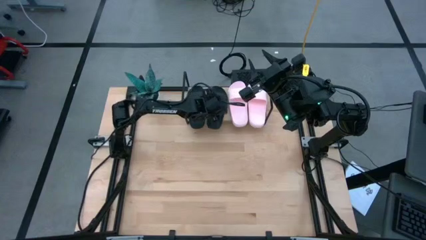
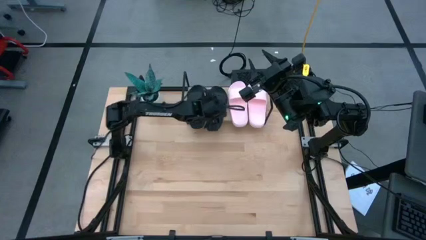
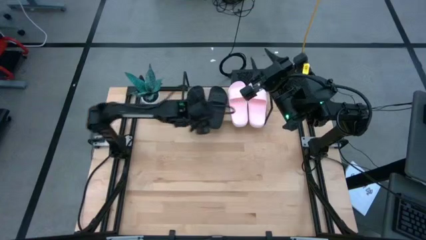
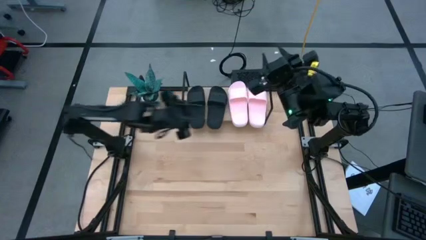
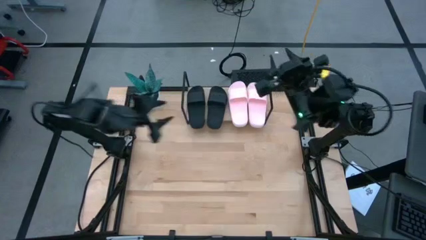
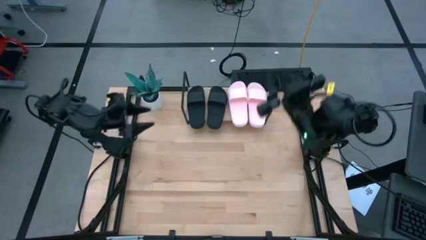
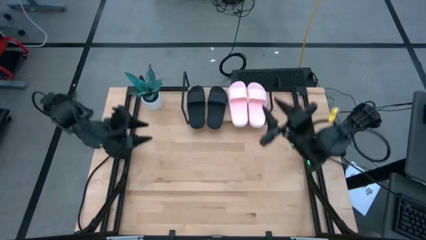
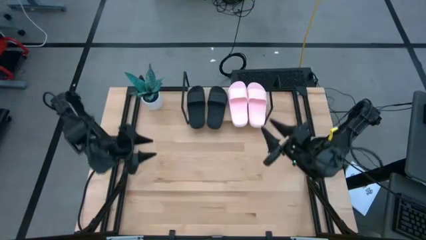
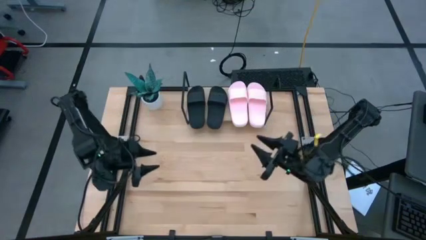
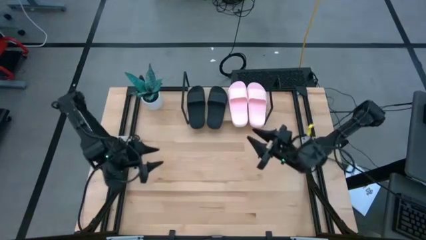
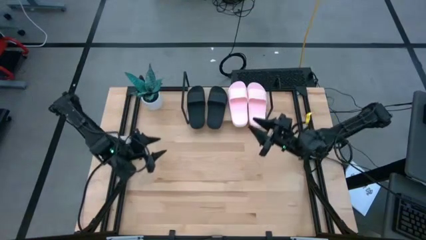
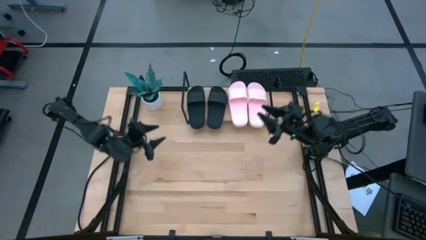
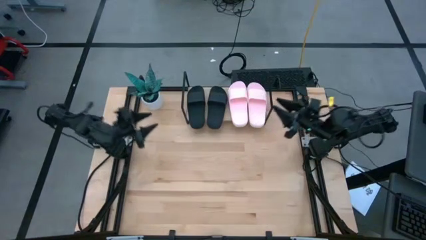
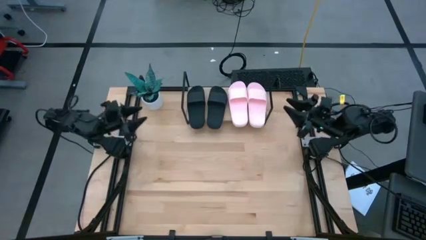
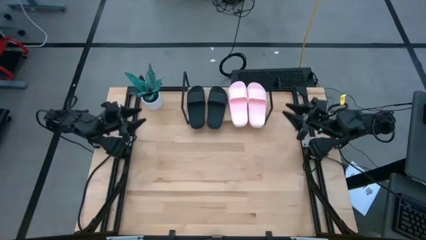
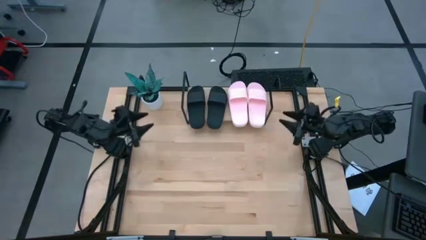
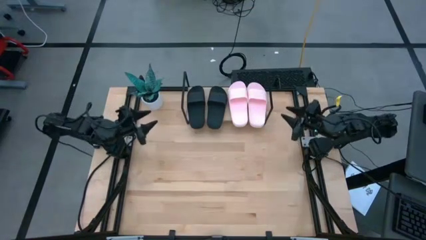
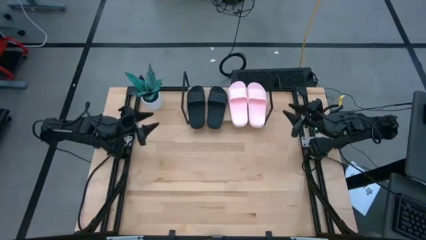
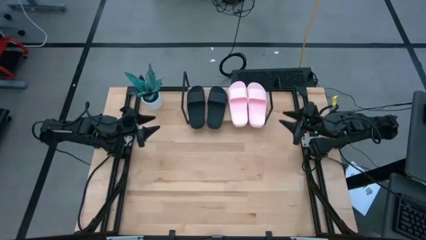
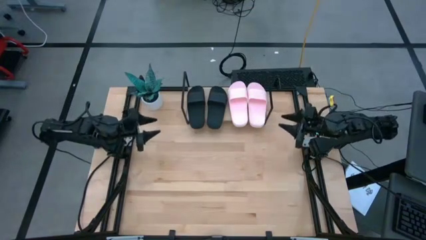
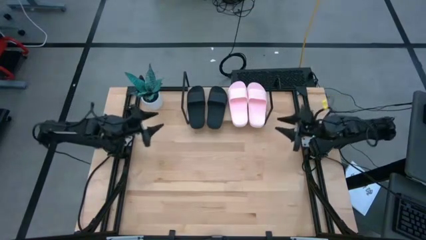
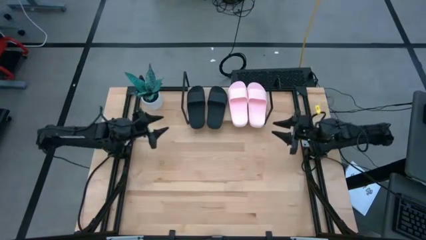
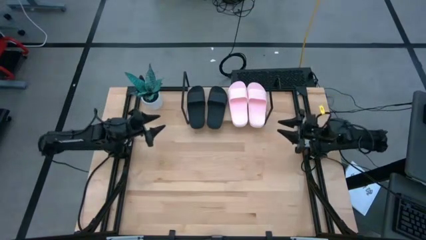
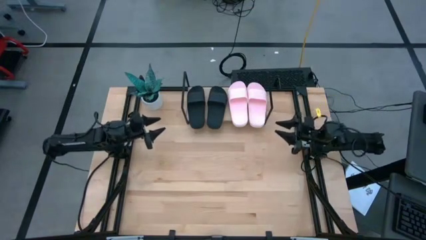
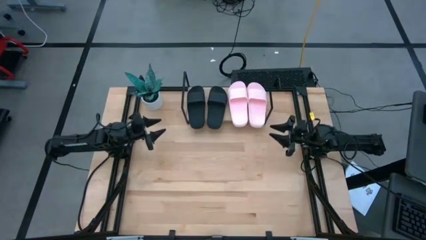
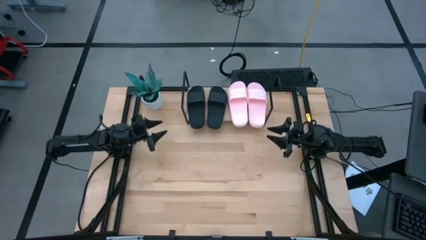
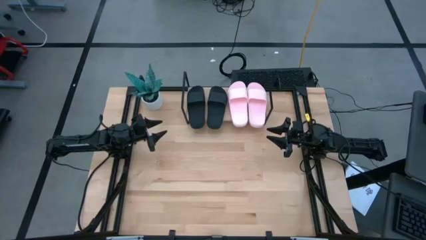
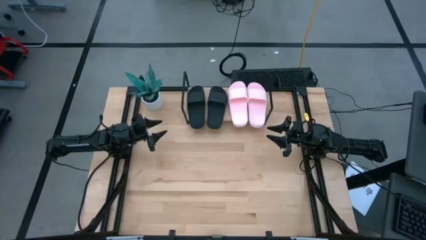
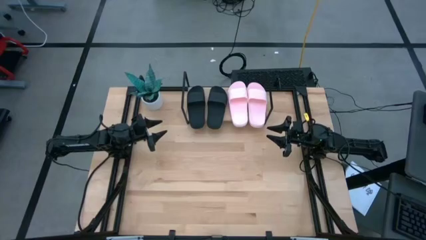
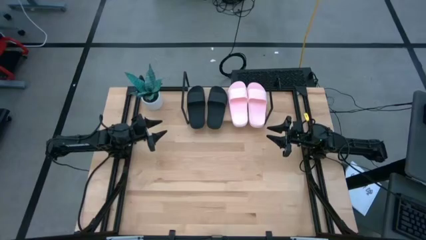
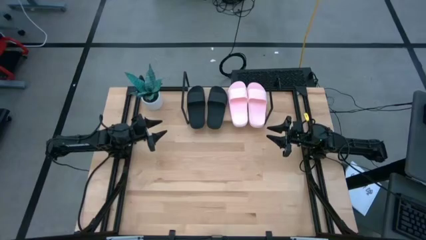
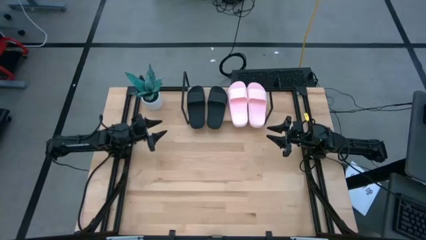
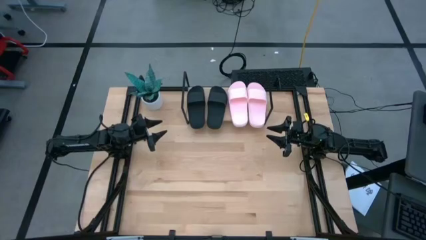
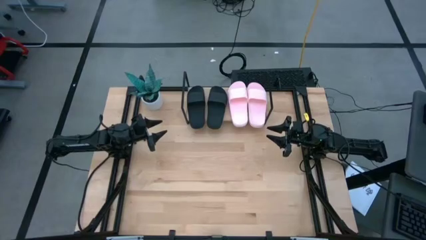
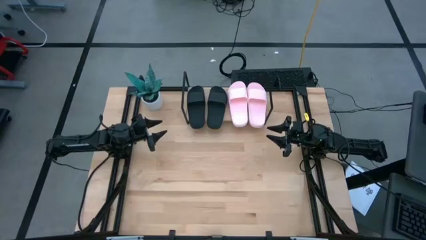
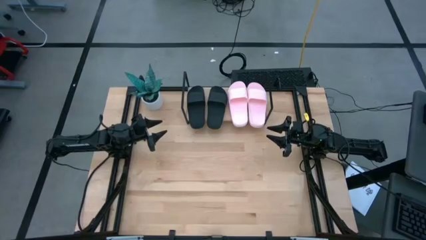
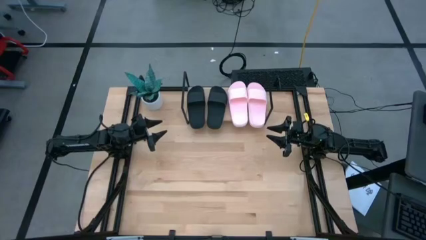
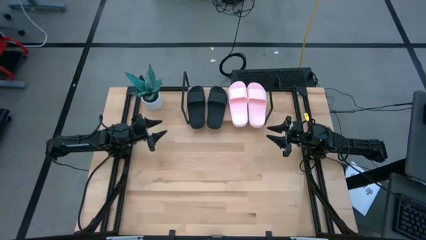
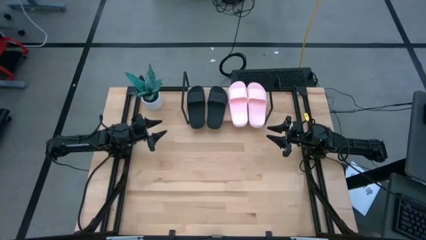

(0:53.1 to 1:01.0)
Task: Pick and place slides into the shelf
Return to Home Position

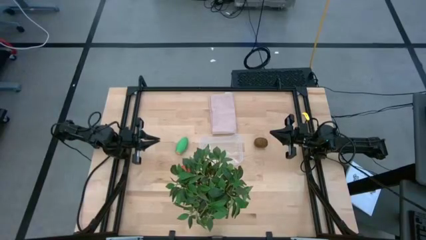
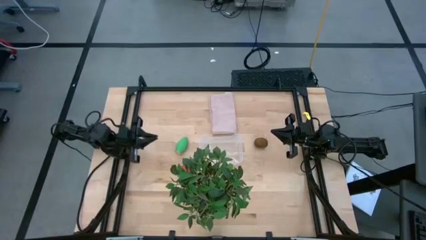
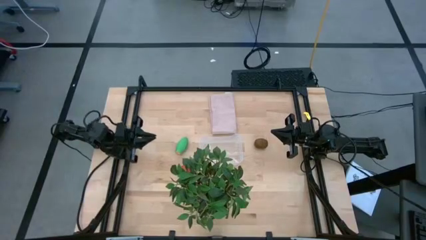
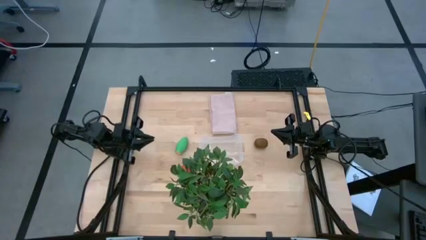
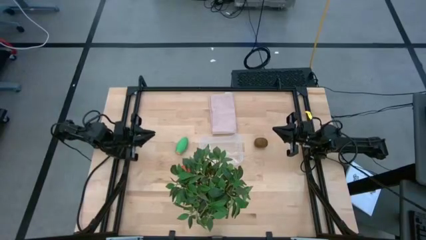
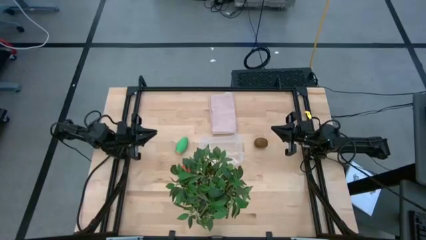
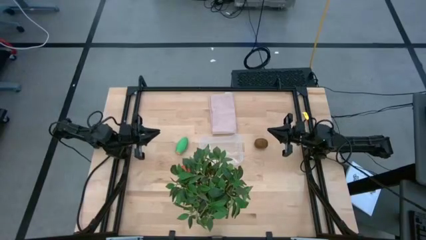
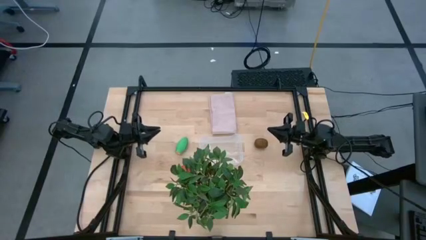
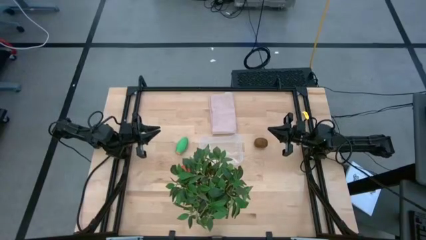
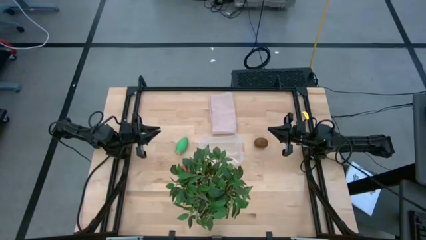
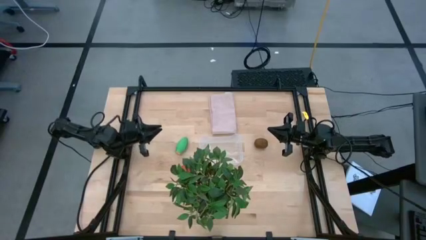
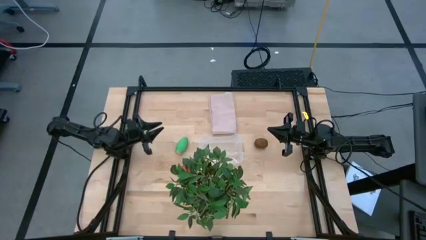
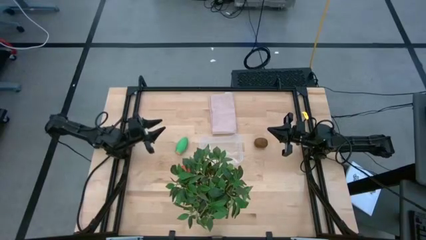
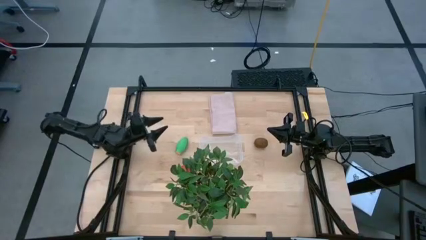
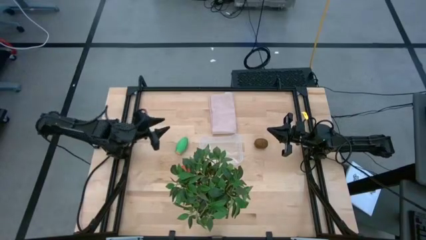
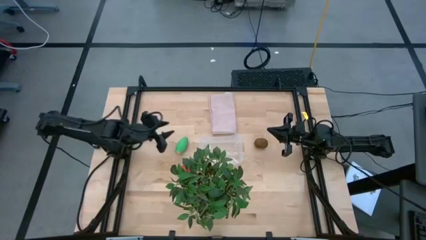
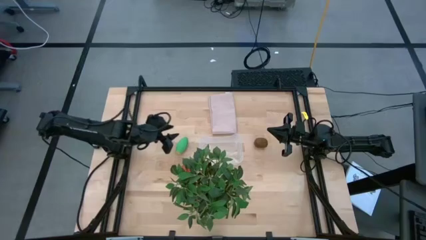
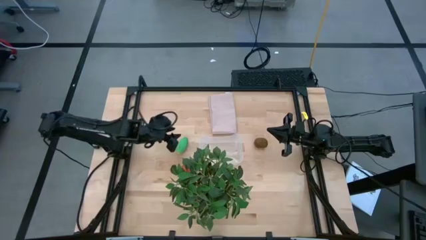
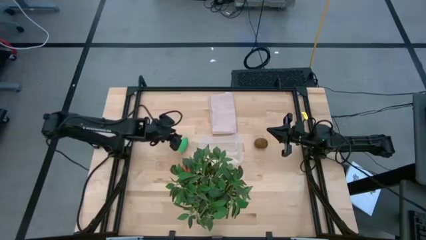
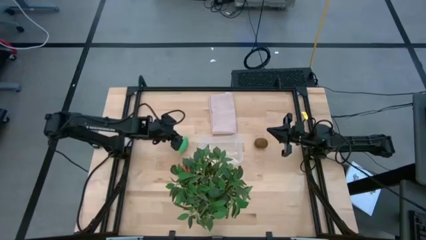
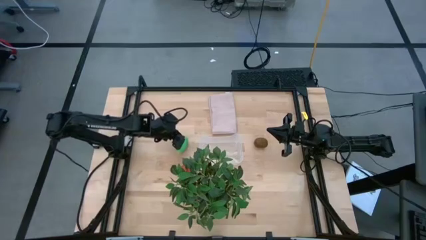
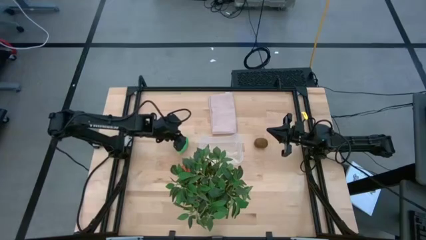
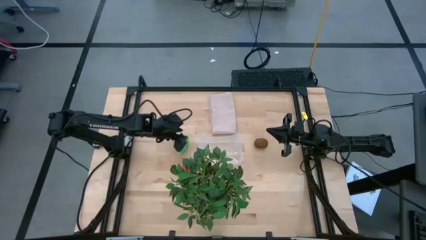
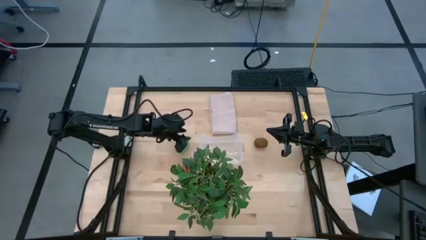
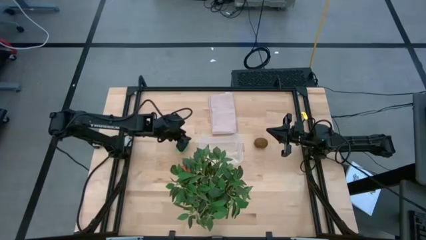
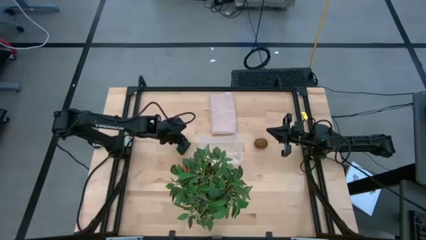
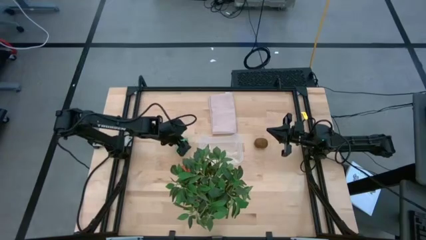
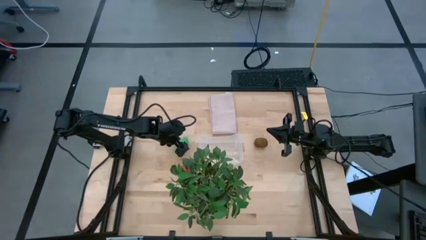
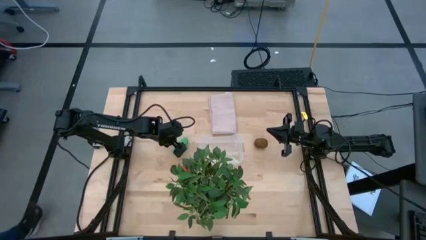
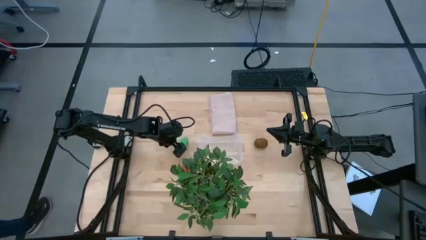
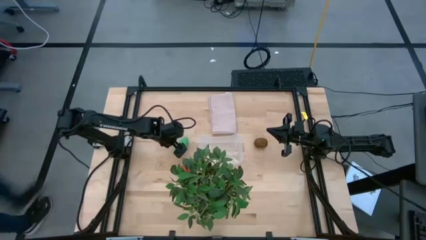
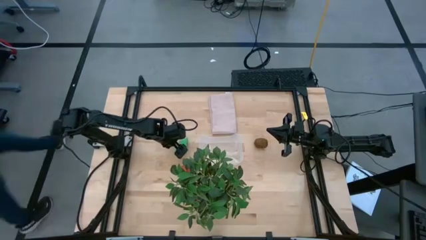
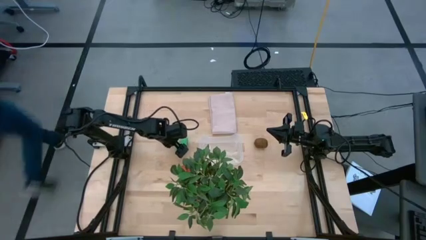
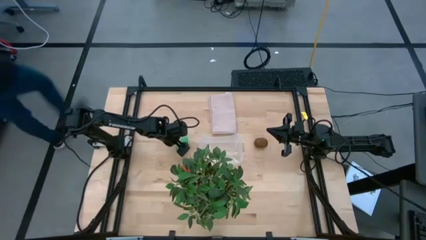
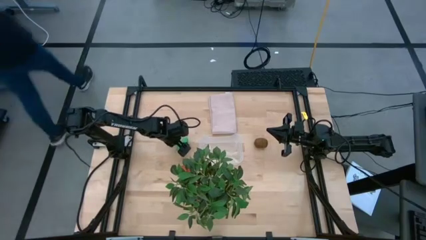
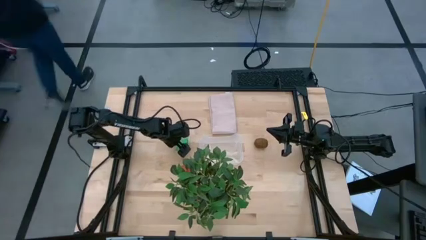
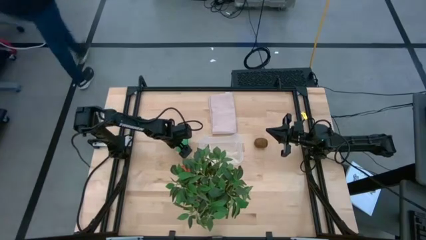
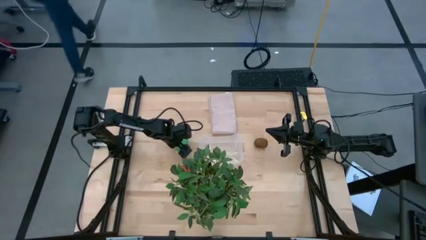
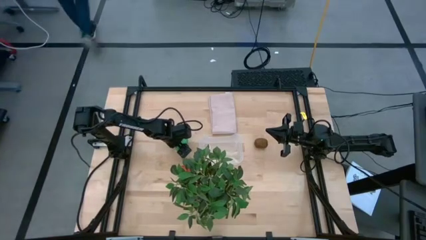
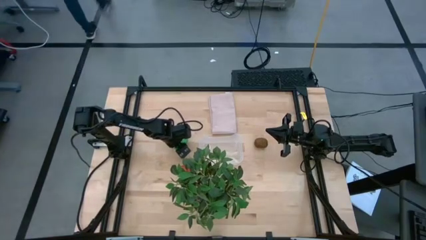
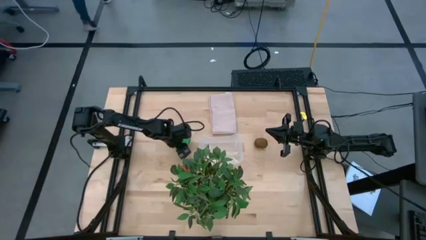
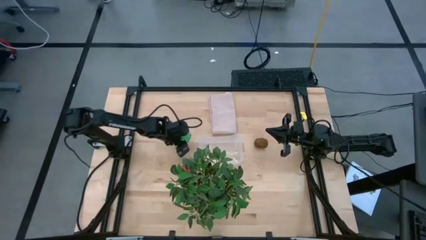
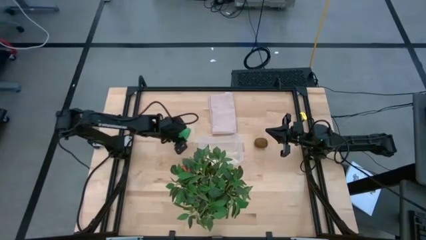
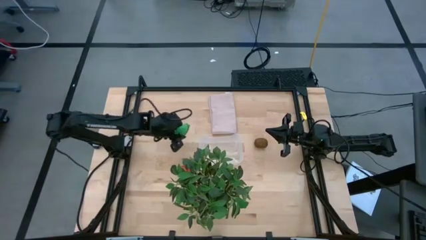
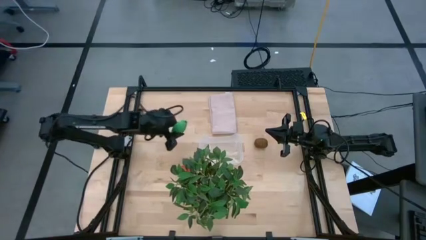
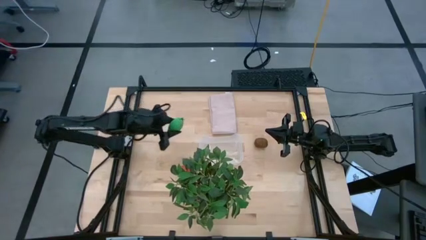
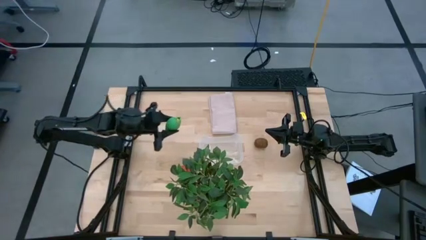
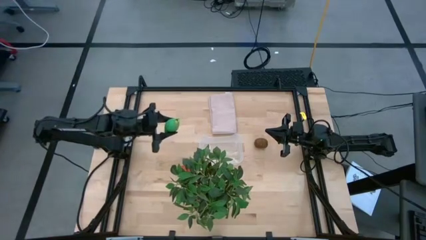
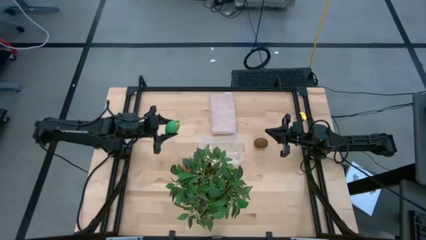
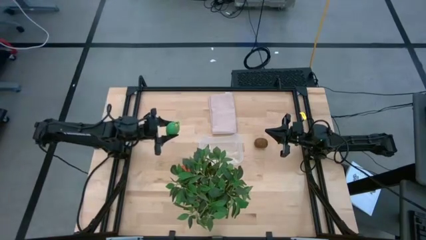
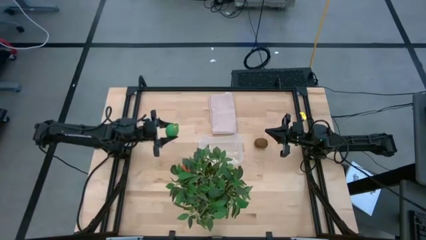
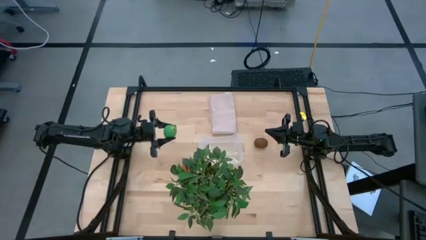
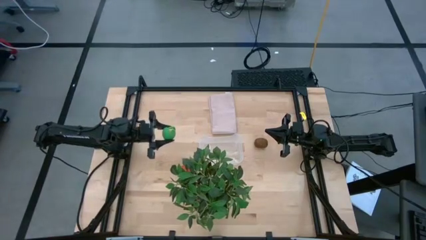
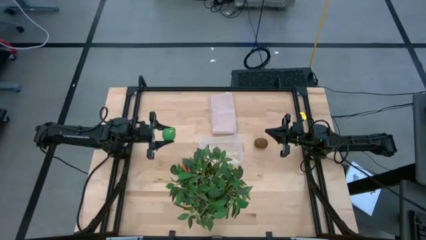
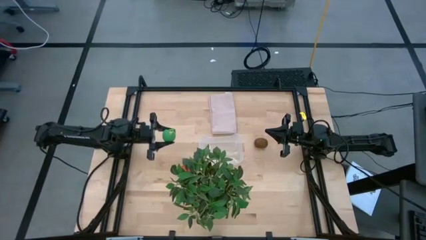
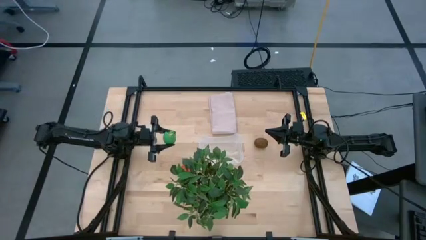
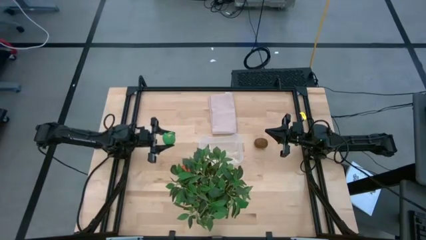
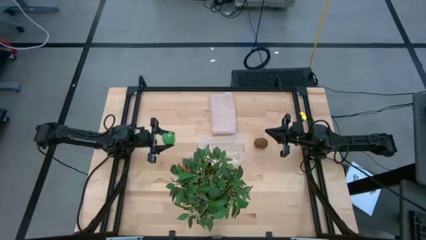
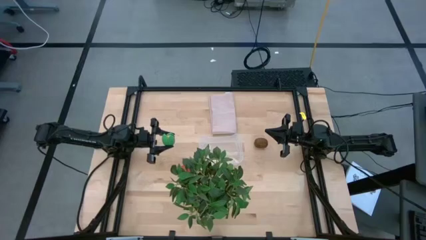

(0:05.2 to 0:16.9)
Task: Pick and placing Produce into tupperware
Put the corn into the transparent bin
